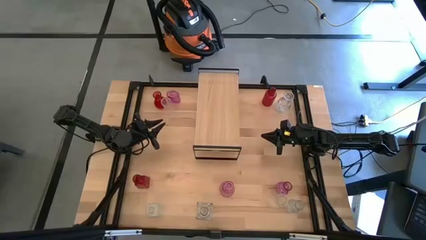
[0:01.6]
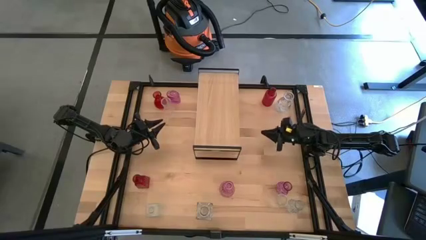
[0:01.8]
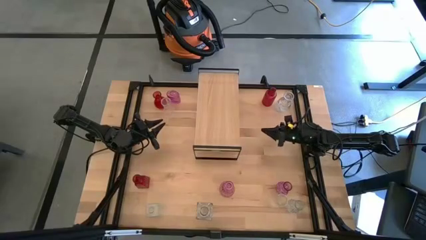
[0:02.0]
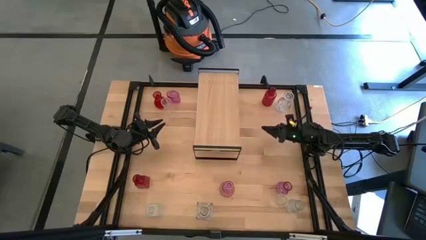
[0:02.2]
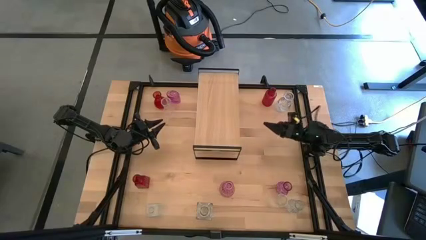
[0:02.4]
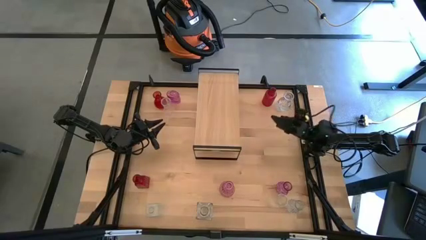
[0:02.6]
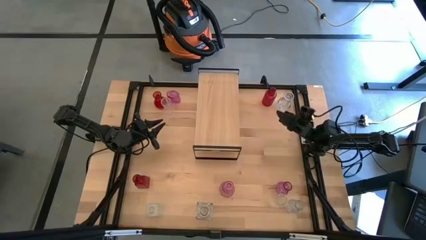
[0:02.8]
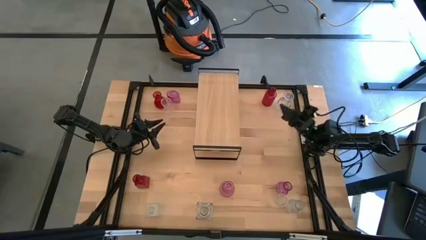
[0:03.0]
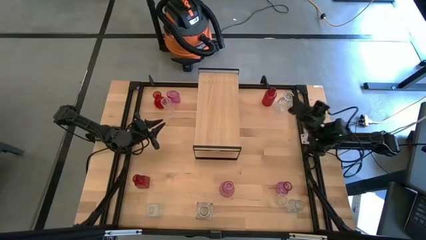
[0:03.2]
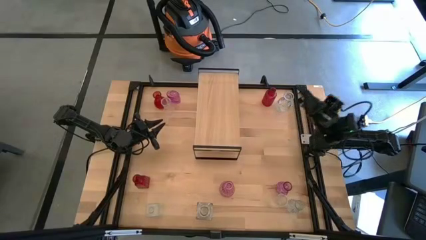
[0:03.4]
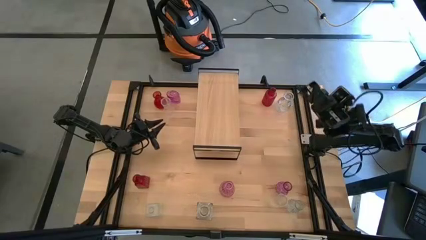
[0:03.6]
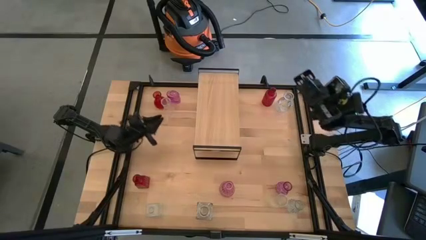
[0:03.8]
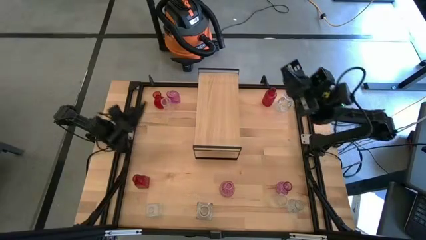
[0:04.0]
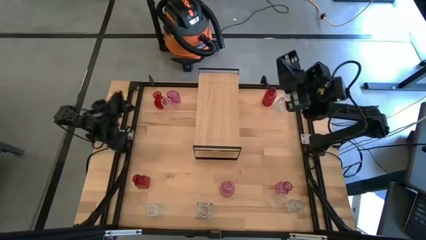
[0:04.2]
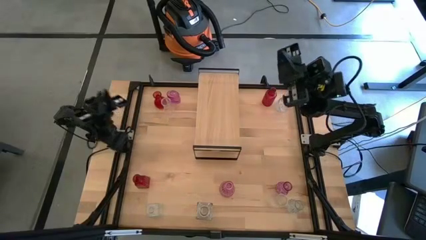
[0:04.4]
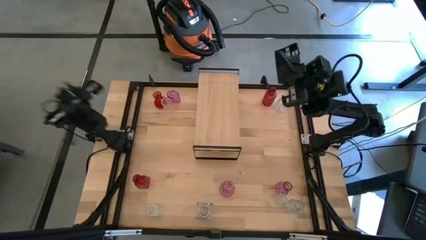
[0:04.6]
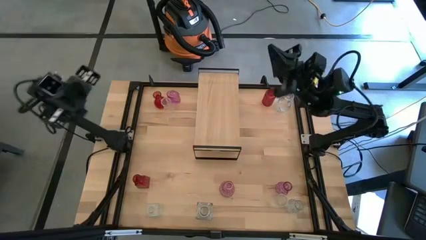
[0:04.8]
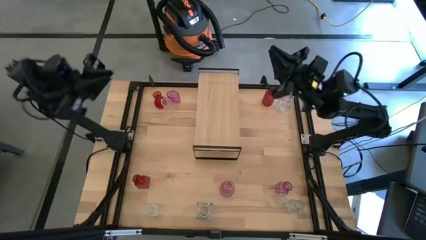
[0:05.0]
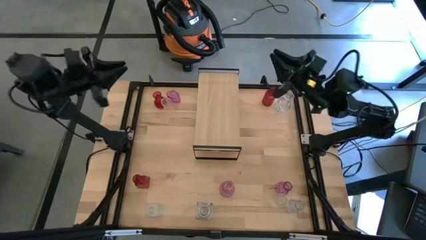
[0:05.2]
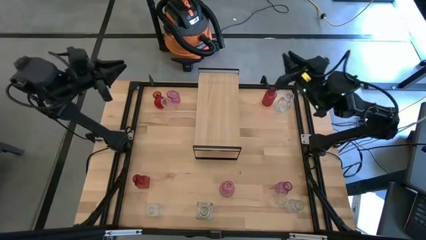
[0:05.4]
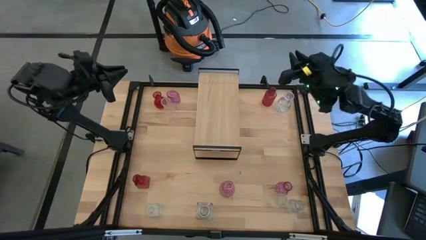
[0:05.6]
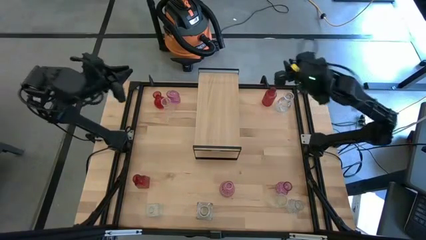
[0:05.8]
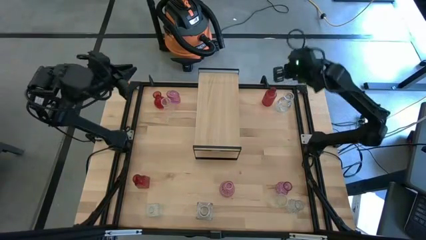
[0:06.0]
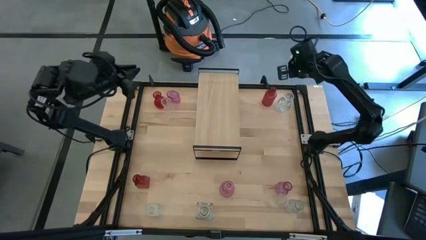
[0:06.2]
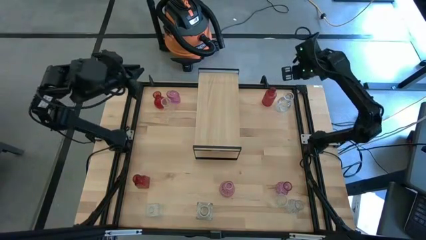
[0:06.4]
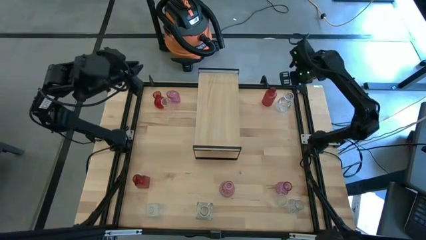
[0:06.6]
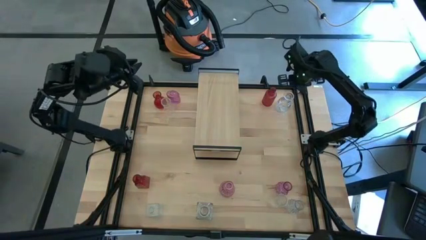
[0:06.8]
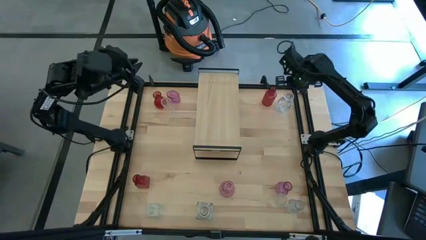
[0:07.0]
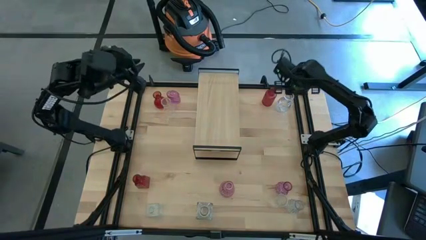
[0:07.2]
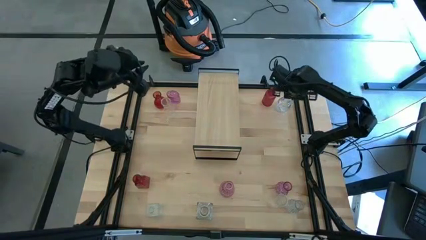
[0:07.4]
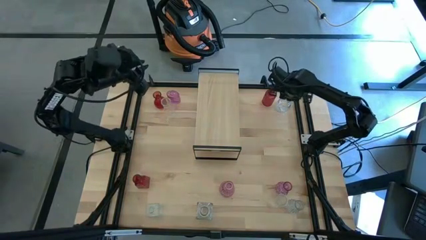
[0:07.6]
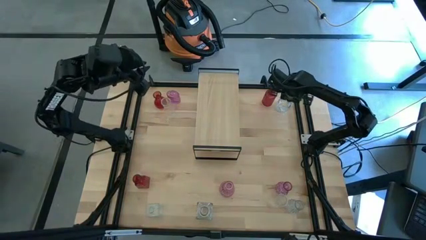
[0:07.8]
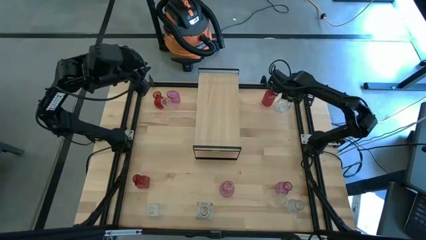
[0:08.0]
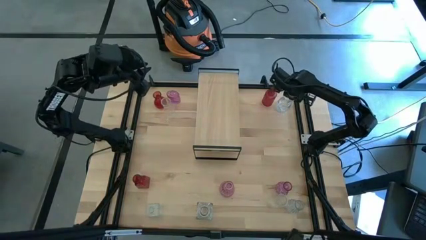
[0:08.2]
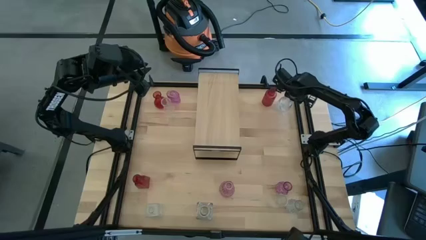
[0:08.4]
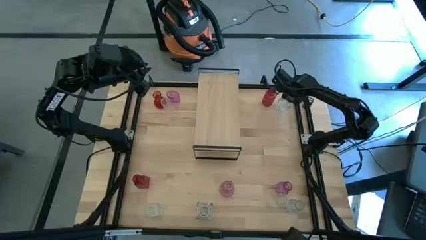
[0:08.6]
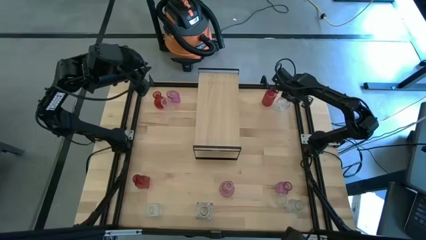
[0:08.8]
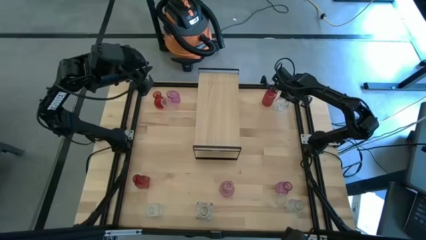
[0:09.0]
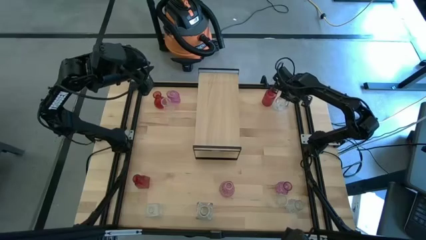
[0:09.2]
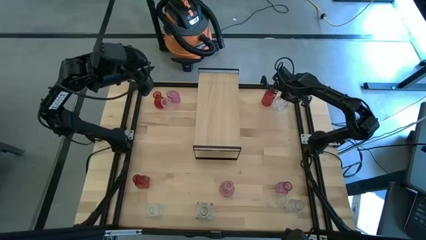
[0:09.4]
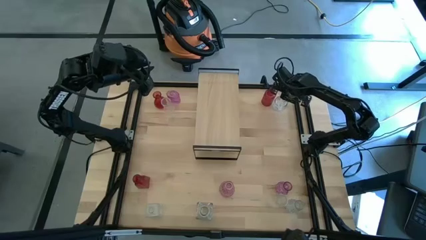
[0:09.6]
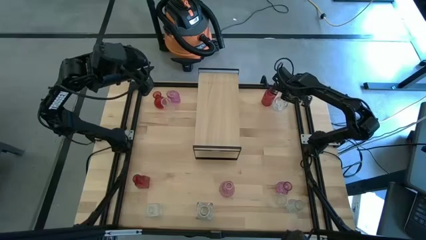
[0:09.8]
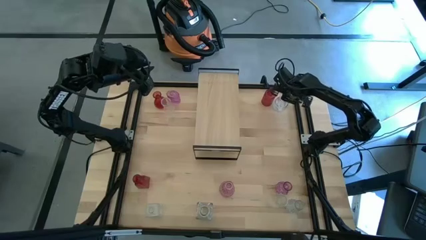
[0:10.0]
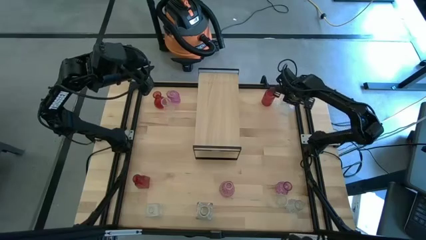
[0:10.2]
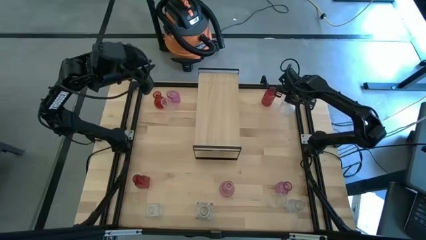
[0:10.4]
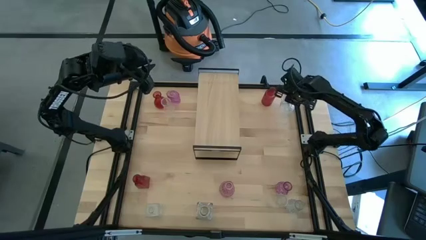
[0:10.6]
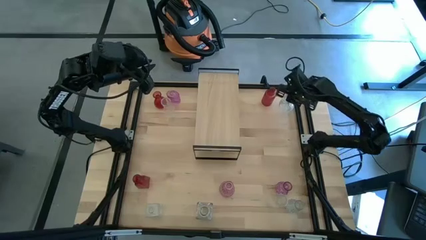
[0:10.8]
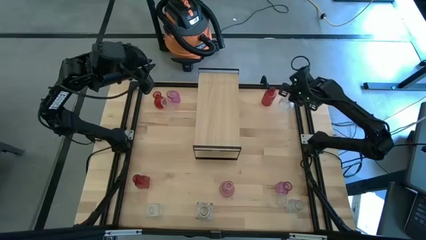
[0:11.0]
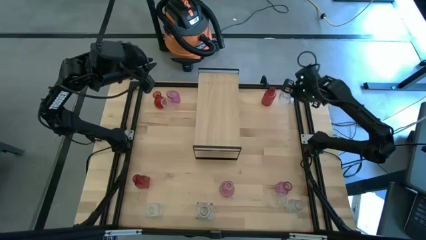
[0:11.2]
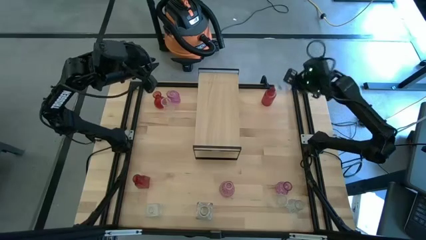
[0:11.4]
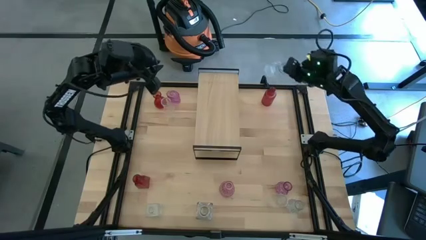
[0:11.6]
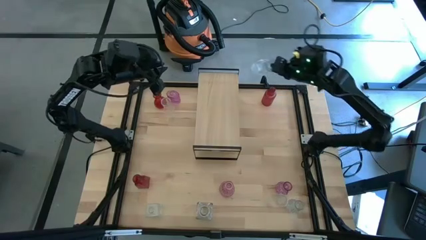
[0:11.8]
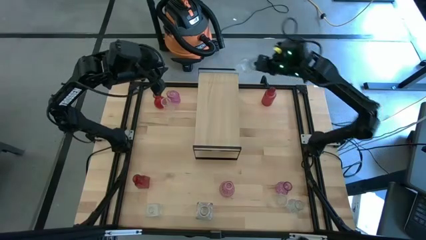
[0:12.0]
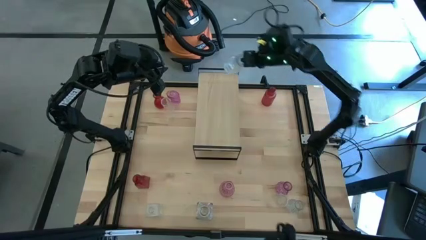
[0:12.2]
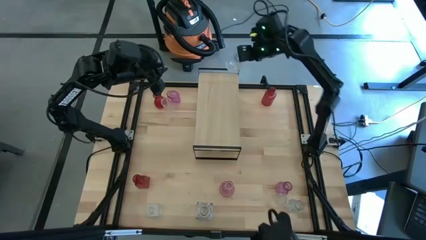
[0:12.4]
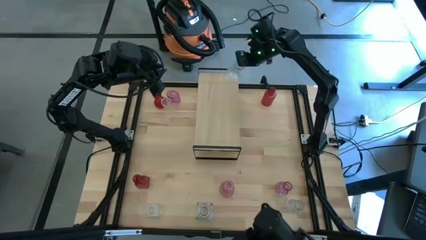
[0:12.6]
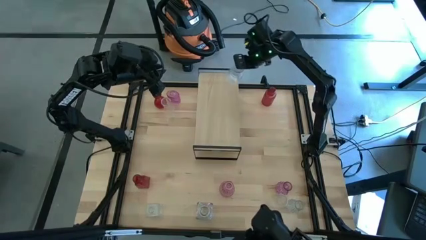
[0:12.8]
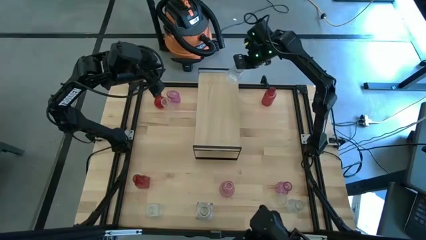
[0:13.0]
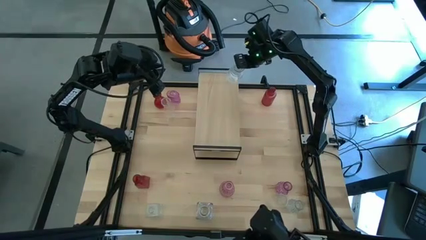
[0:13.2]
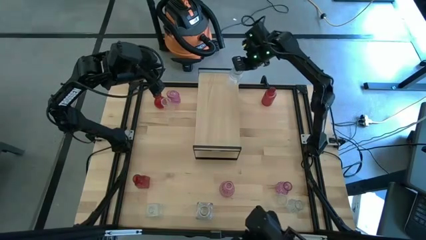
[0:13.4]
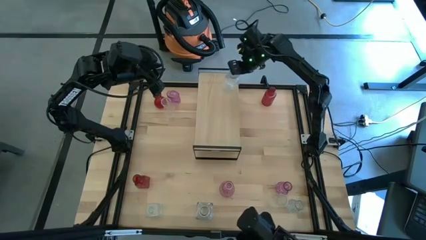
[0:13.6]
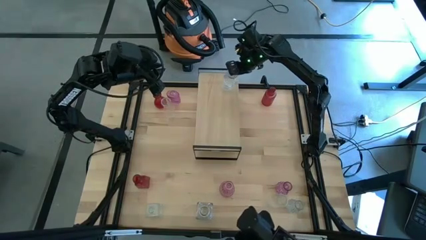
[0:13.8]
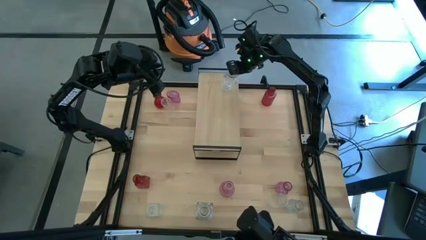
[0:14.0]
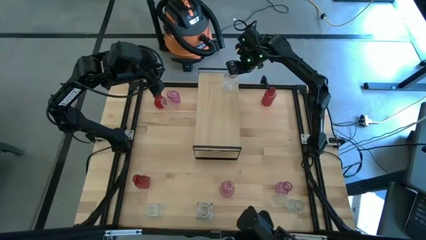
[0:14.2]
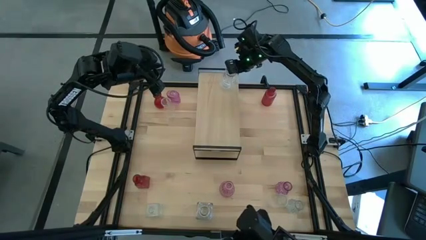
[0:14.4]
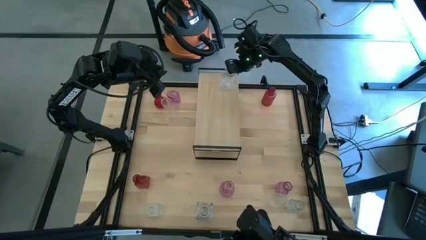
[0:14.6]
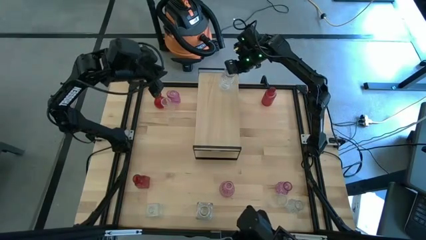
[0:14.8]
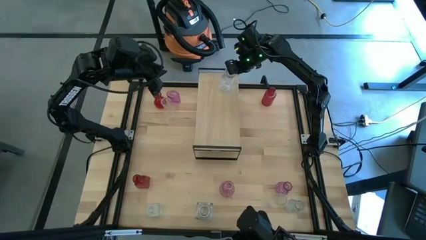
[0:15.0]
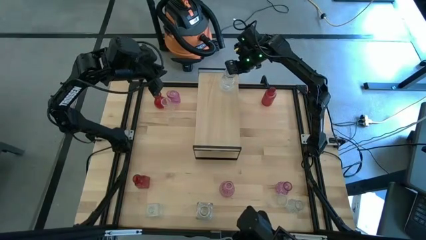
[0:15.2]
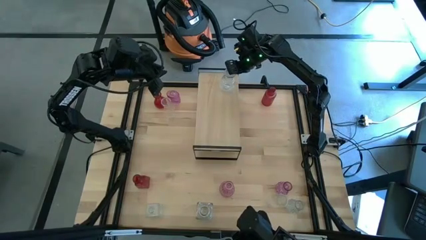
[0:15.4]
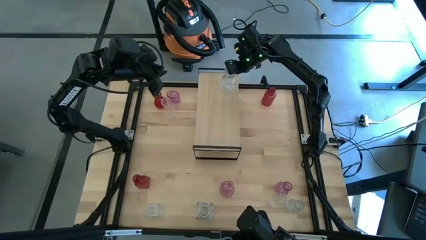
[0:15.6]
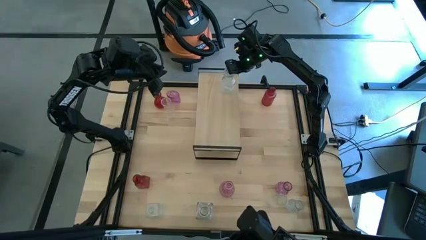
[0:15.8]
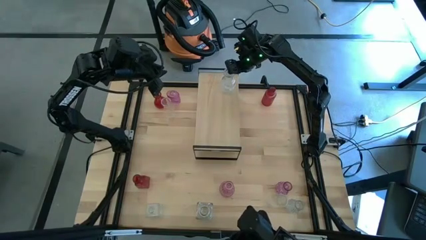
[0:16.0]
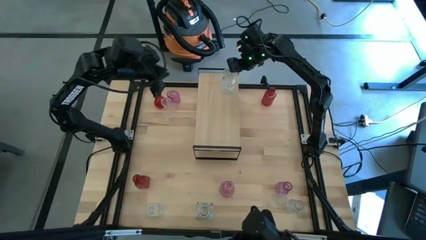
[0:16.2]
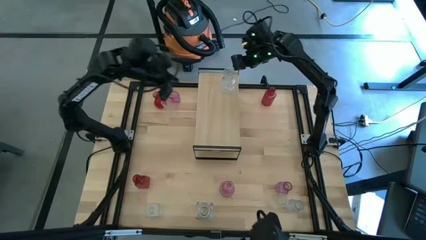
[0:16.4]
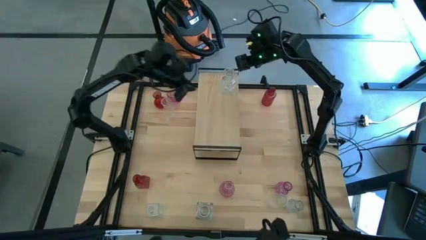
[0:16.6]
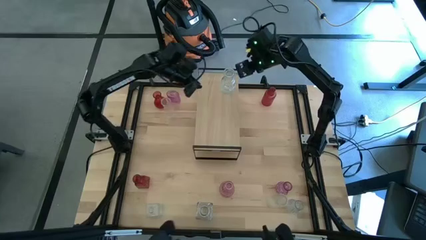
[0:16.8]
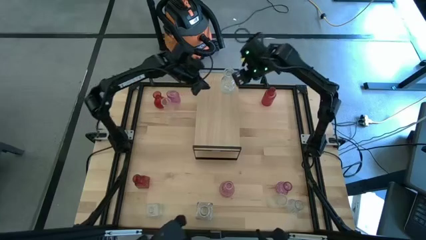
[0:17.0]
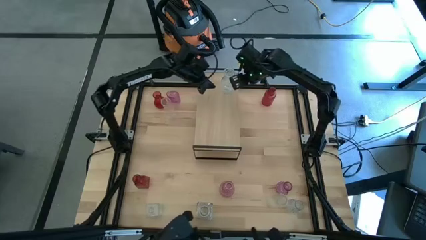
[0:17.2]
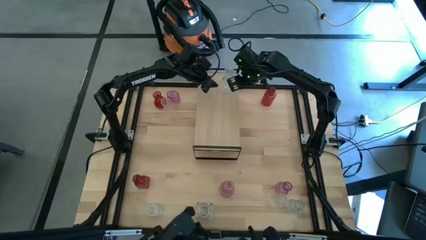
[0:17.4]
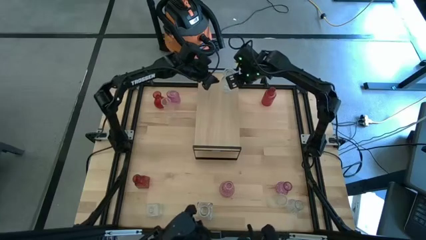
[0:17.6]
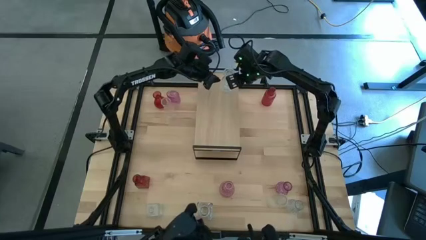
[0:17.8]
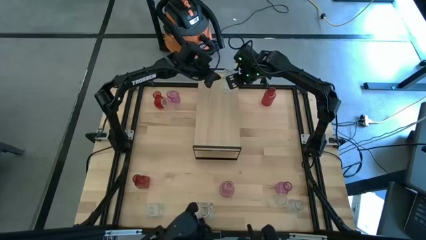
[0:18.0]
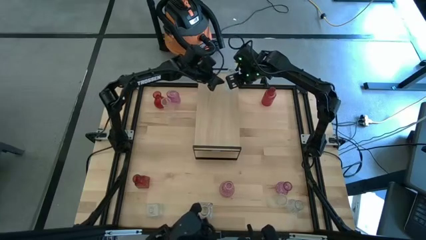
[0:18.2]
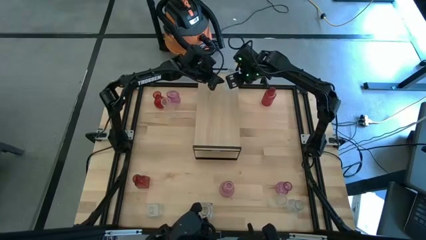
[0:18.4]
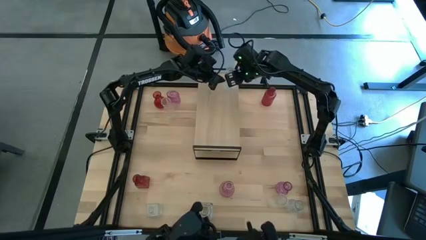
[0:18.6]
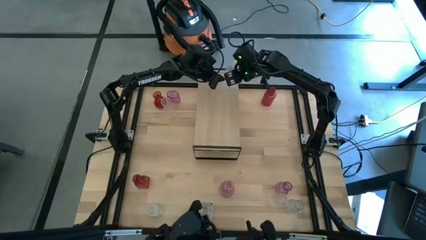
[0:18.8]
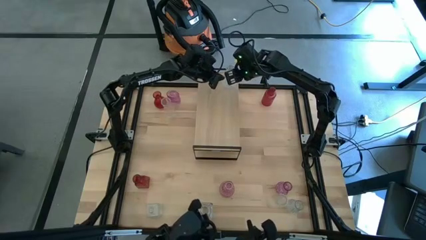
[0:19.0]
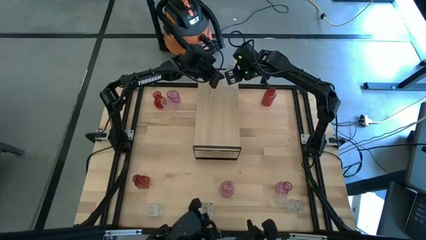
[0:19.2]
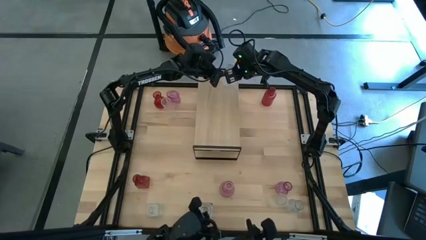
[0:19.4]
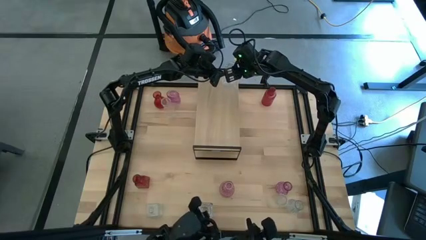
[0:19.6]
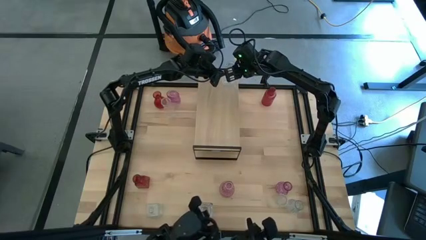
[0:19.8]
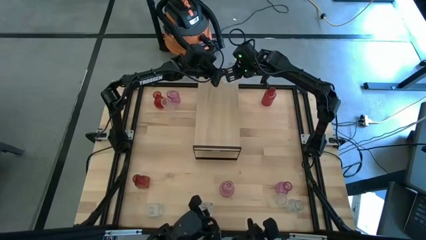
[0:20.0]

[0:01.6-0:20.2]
Task: sort vases onto shelf
Put the transparent vase on the shelf
